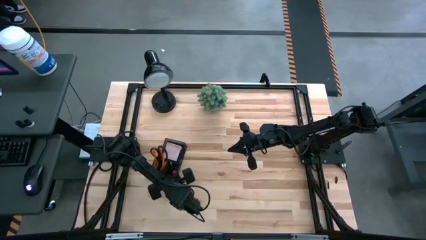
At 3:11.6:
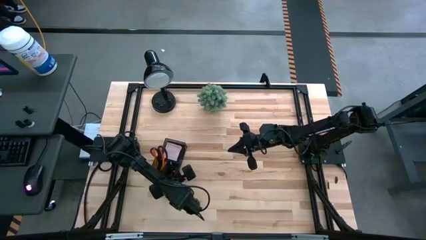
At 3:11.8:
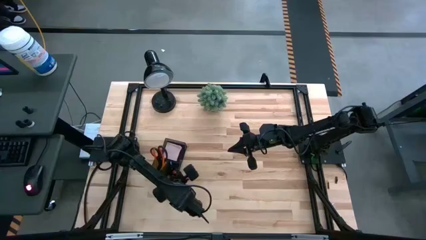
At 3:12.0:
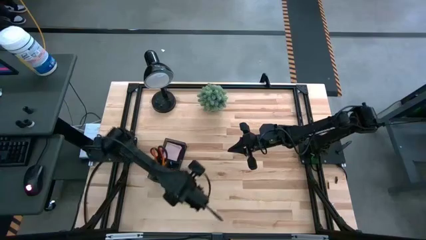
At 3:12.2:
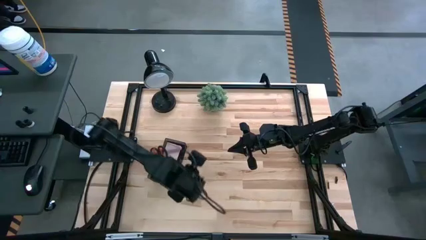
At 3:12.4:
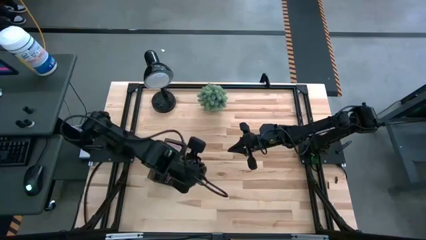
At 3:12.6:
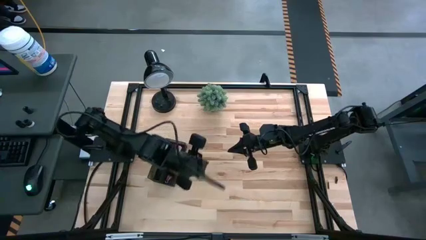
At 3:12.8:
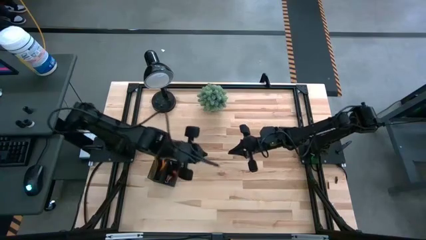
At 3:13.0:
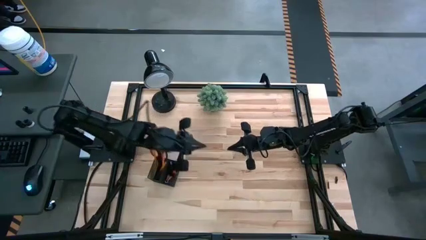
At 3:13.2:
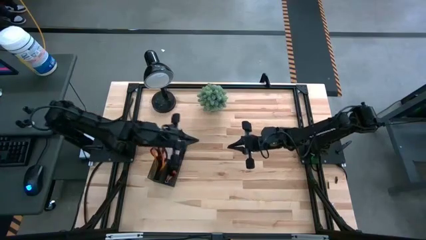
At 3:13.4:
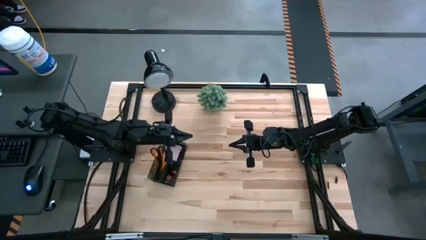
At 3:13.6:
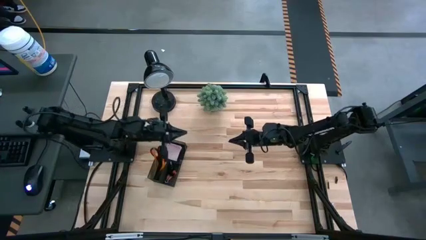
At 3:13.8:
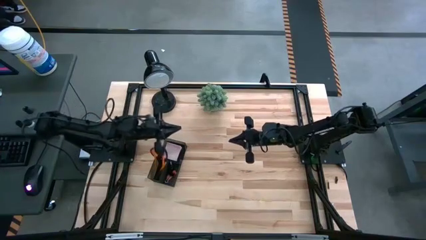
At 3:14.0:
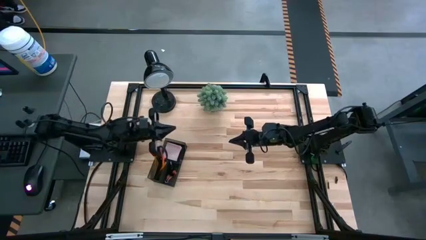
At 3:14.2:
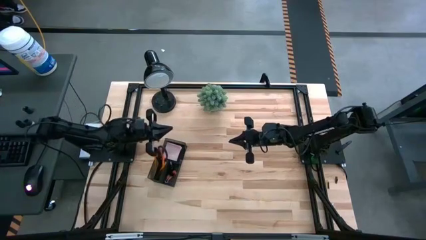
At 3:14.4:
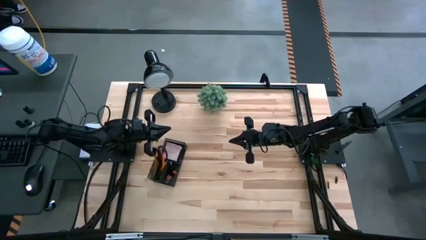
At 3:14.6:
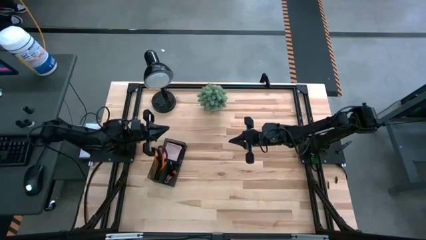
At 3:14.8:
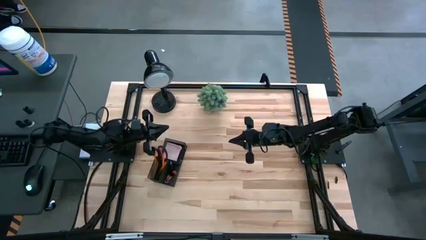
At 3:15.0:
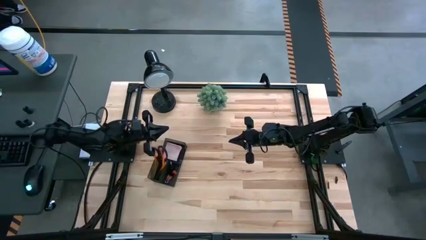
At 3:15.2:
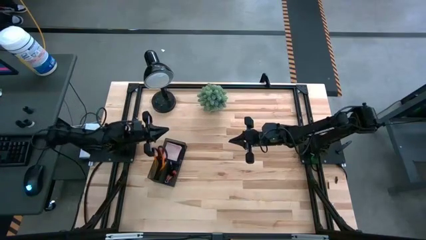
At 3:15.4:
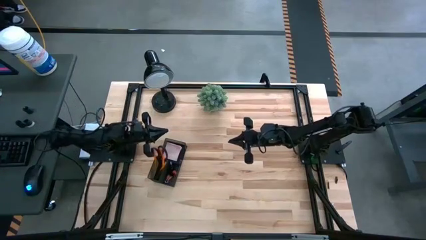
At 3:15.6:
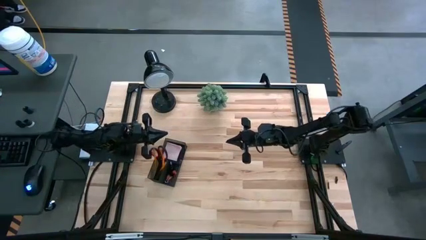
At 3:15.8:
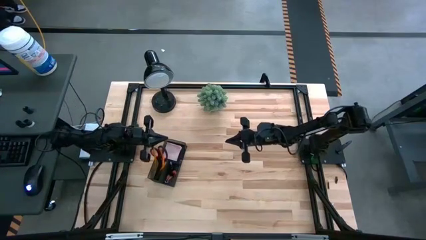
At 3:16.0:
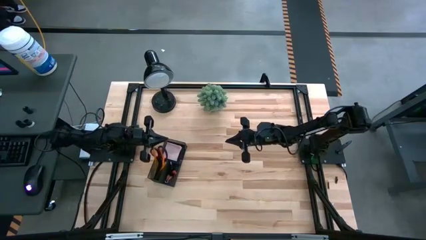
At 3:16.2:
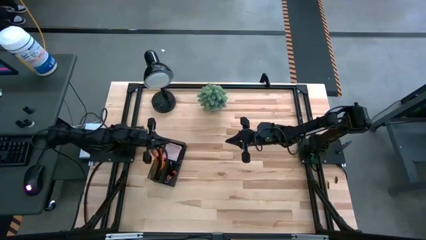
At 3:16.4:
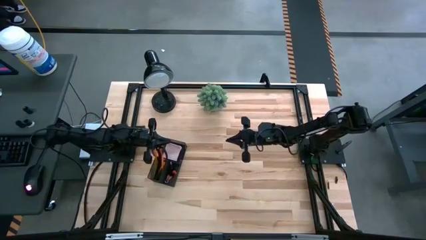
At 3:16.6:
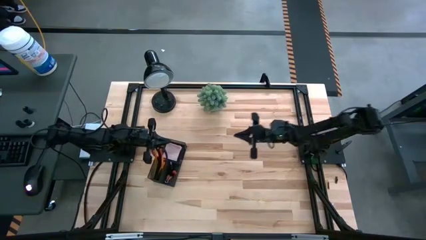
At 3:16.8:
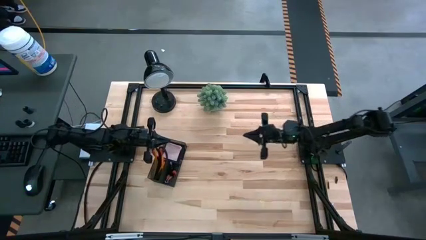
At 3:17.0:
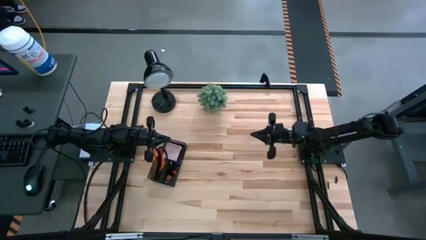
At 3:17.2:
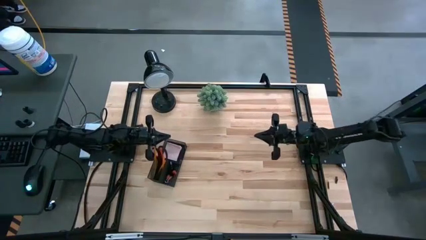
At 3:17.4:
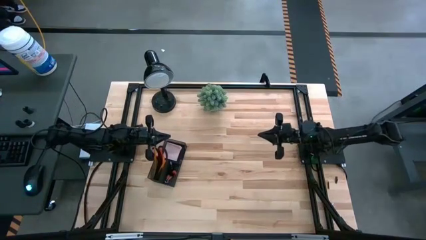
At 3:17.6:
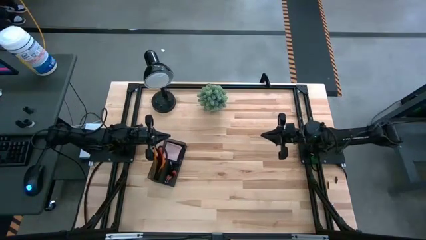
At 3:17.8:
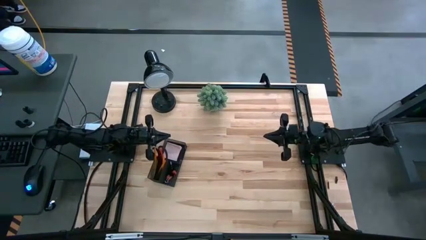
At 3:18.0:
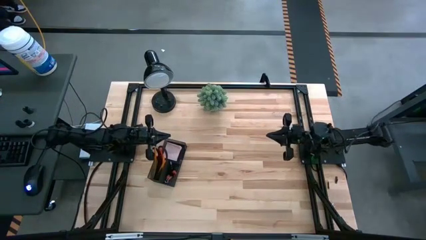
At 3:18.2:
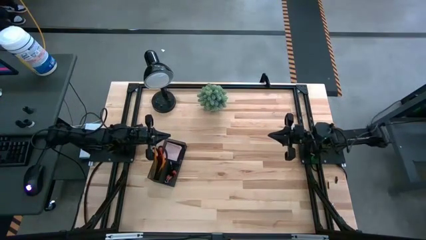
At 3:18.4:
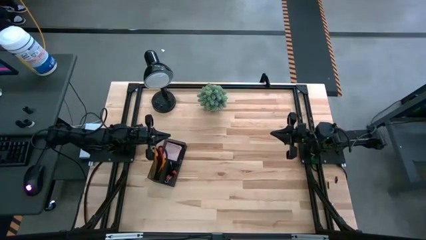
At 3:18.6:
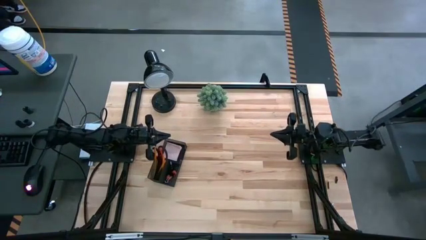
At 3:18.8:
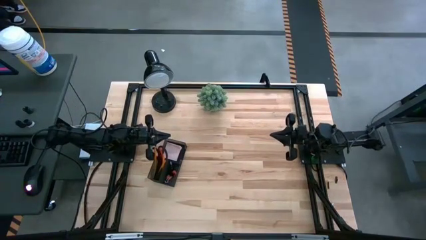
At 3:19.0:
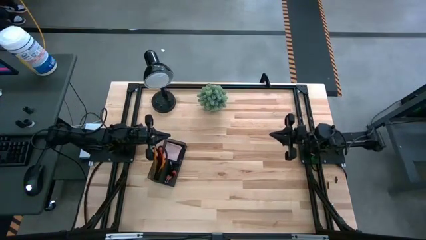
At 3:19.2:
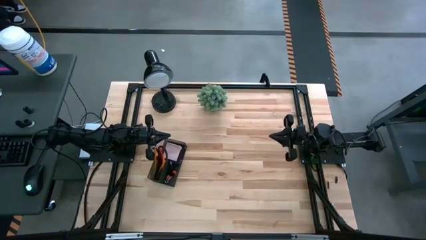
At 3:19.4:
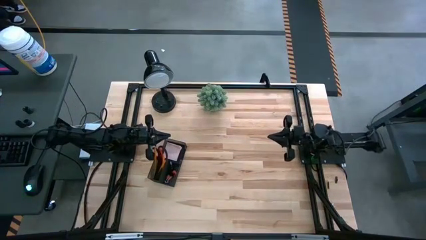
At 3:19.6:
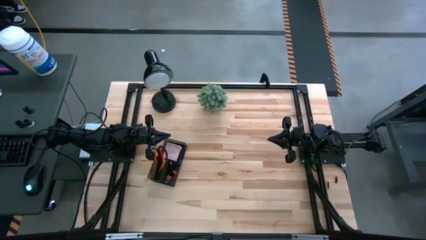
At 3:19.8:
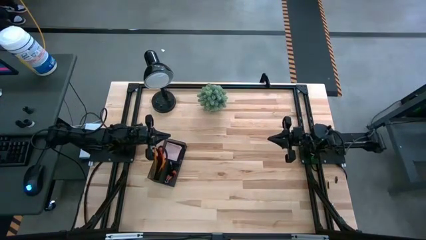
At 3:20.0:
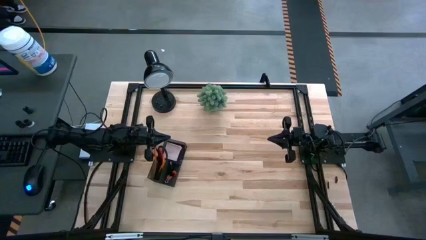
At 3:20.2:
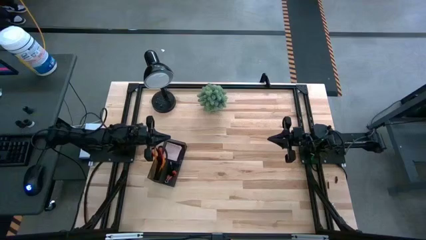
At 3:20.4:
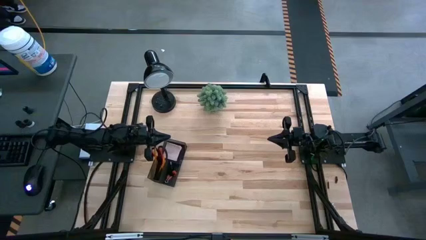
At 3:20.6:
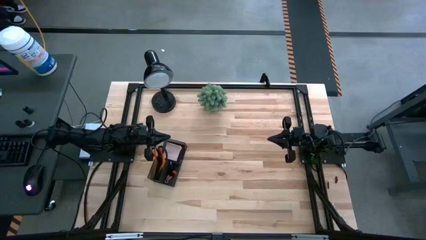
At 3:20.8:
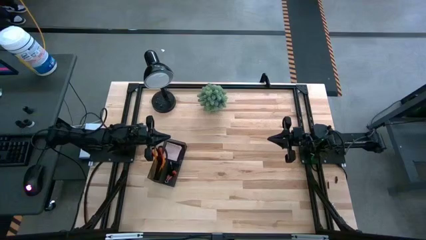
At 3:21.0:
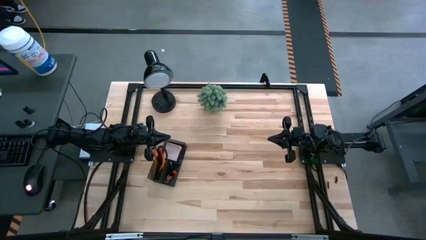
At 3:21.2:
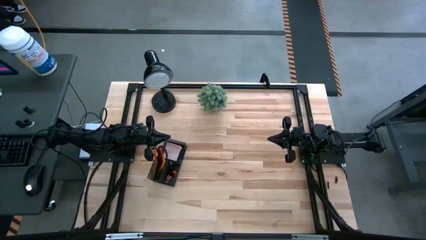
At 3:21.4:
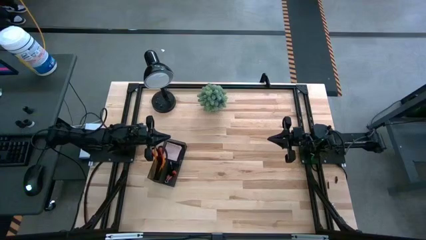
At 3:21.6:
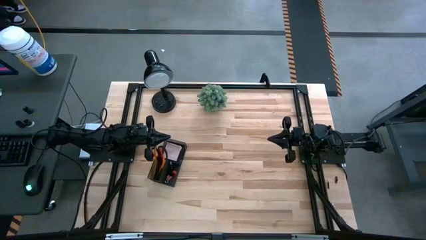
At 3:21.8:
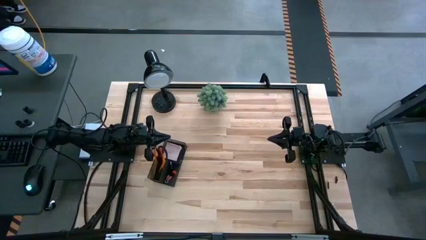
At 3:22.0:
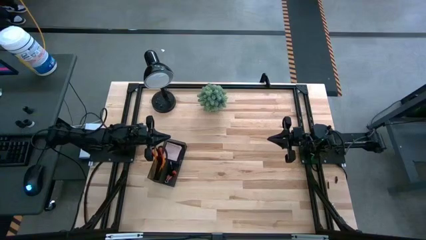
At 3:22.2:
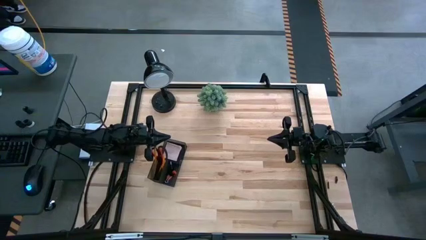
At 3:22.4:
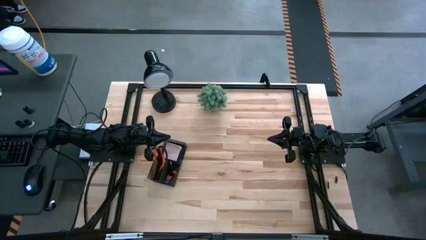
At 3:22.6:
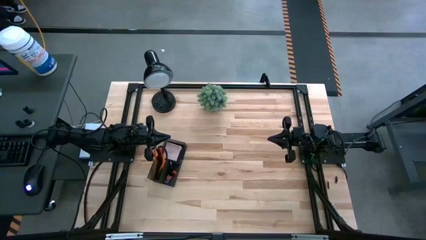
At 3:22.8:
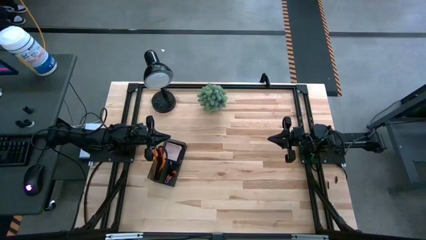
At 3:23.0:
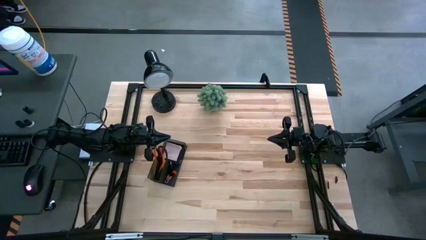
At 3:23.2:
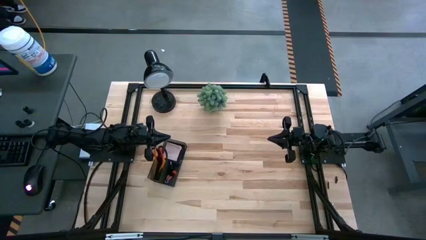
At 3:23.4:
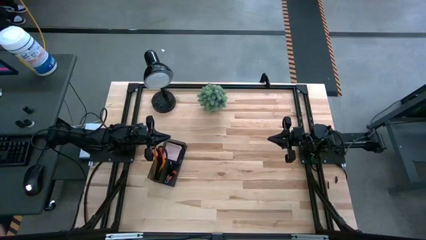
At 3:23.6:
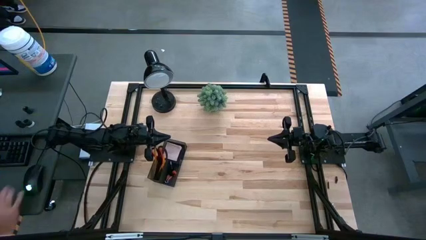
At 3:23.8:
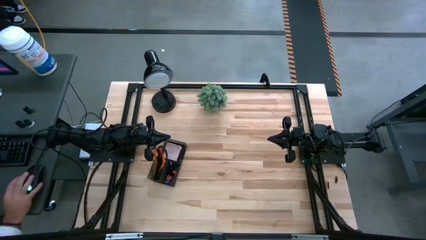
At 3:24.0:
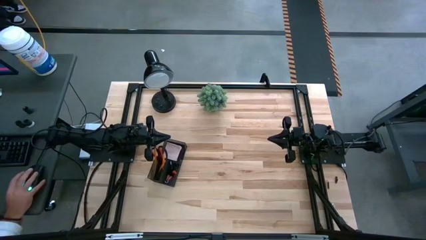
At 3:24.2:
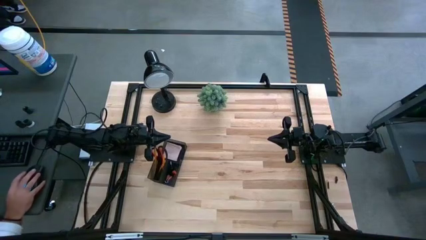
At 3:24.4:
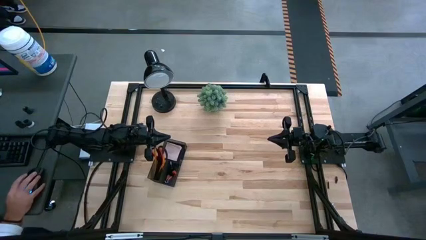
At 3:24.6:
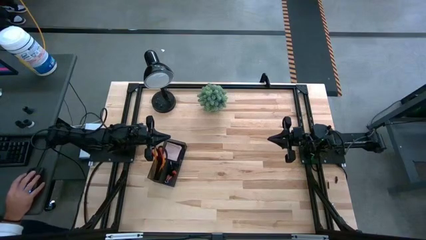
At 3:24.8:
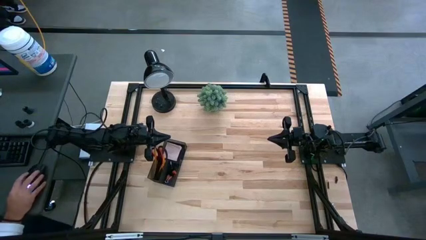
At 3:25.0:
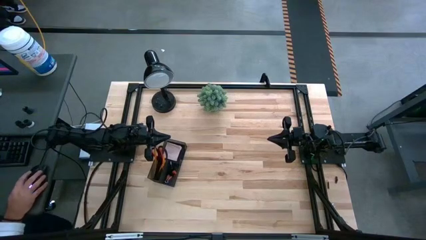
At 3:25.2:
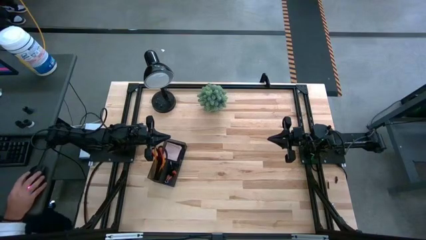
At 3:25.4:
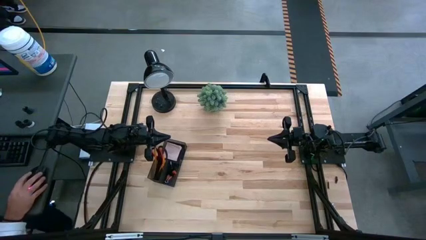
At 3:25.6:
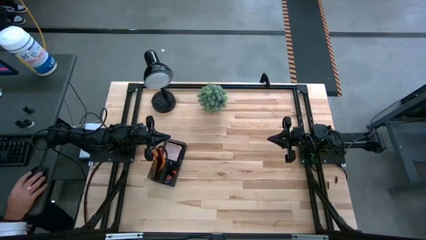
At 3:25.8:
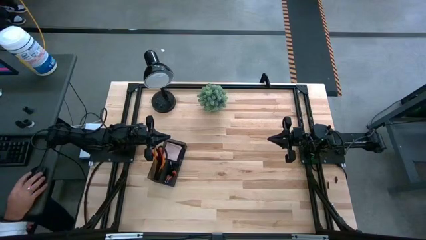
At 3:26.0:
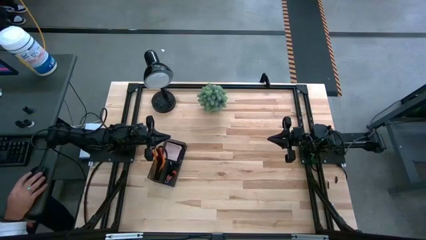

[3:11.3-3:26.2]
Task: Pick and place office supplies into organizer
Return to Home Position
